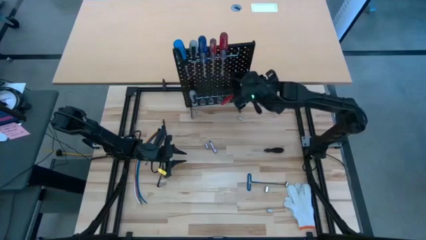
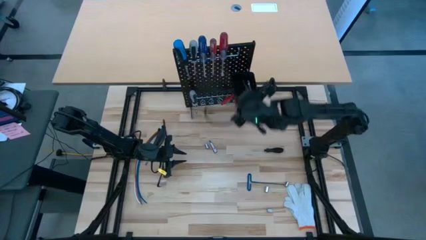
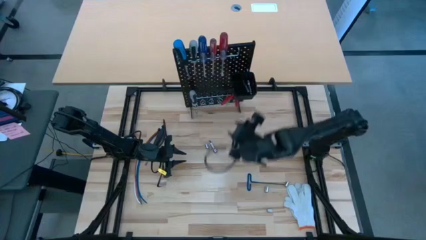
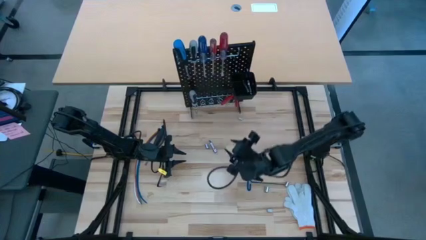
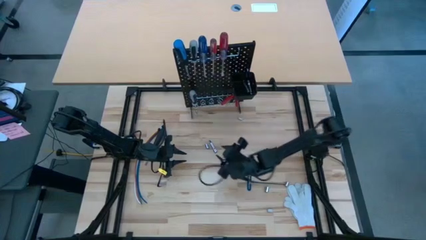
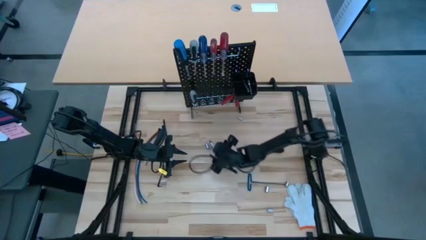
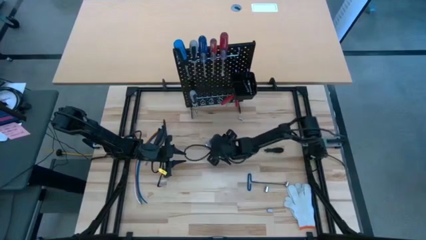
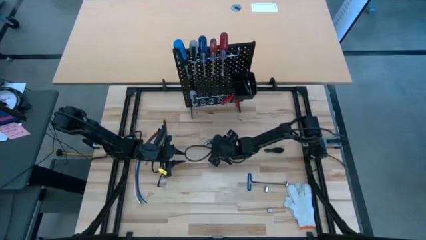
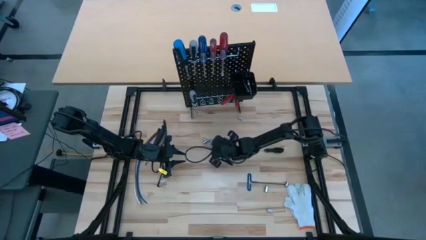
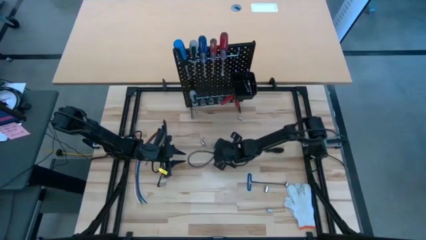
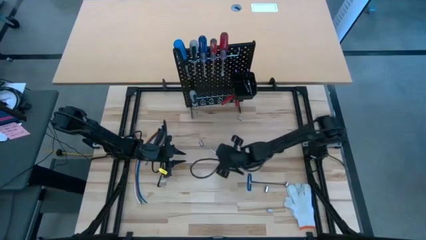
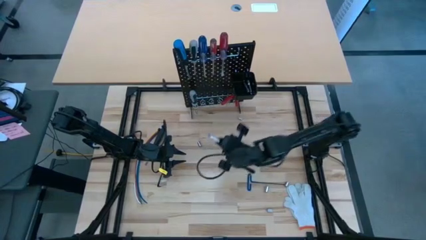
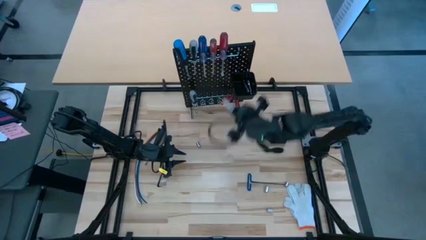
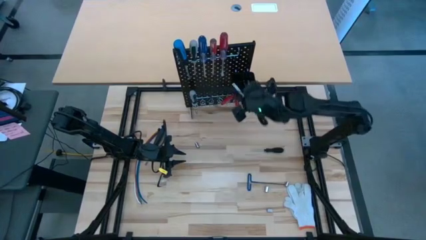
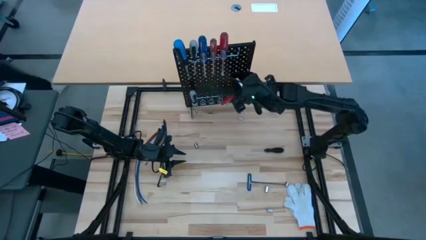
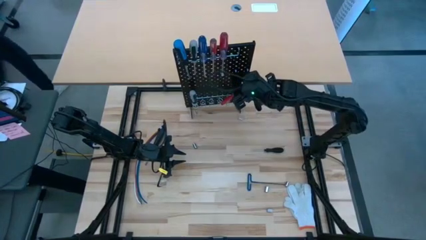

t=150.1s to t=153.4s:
Task: Hang tools onto peg board
Put the extension bar into the black bin on the pegboard

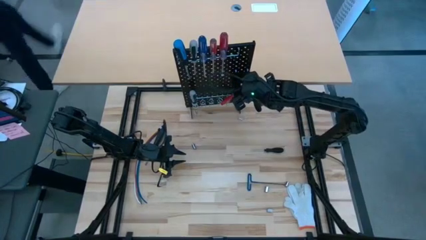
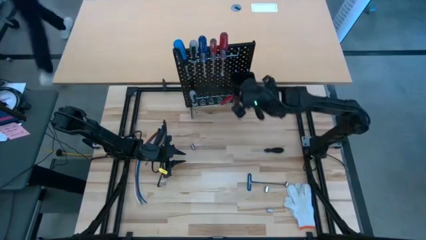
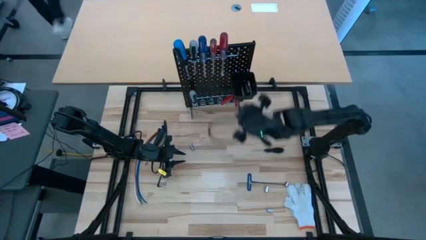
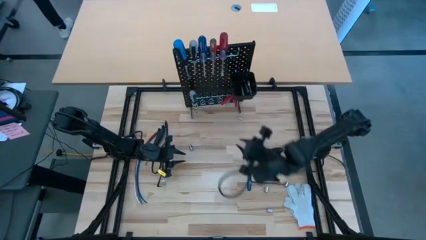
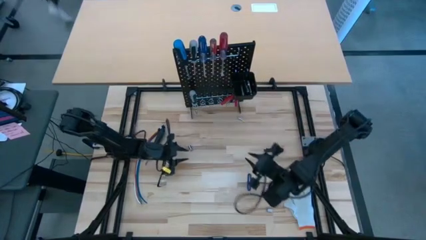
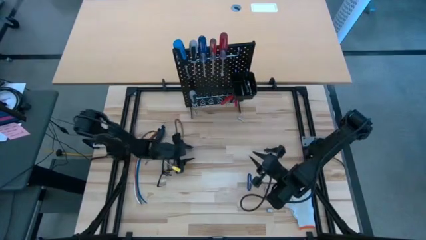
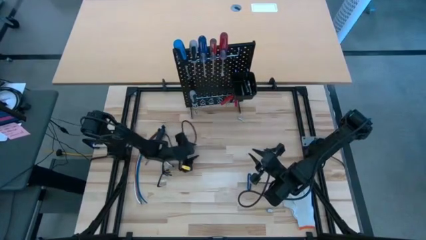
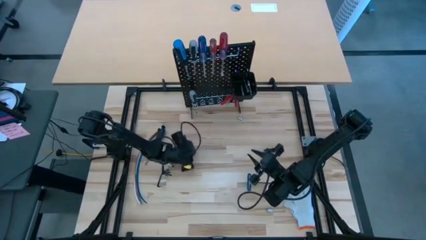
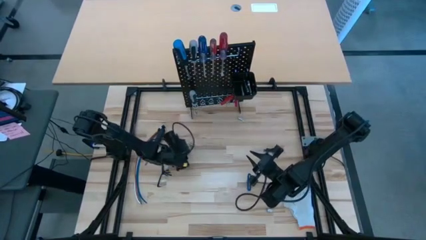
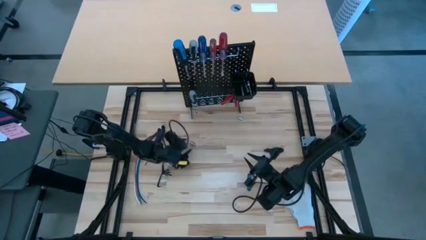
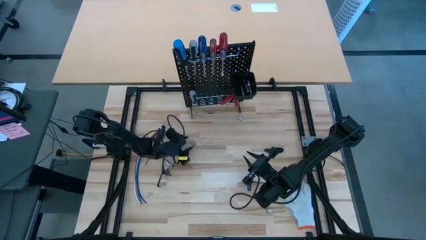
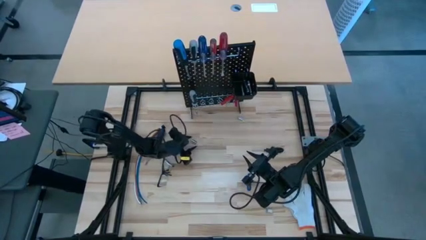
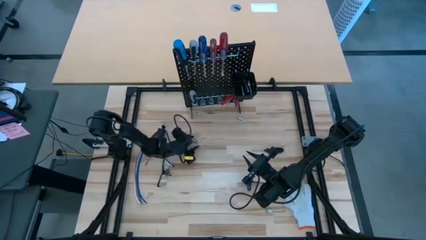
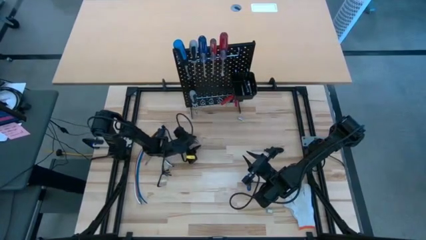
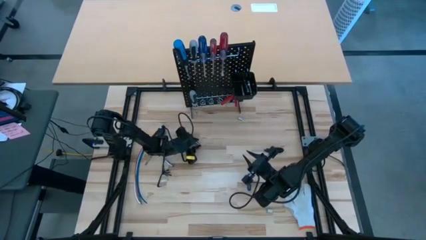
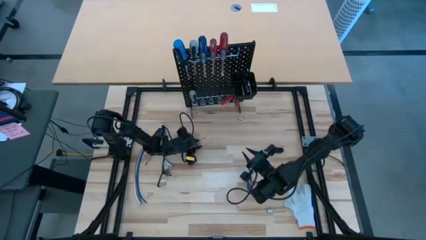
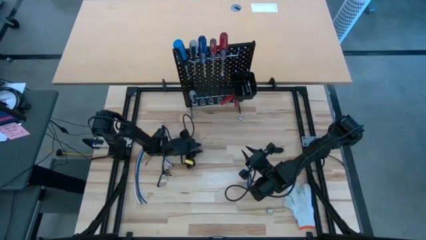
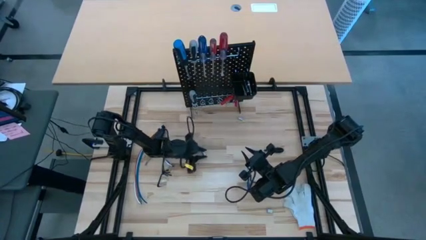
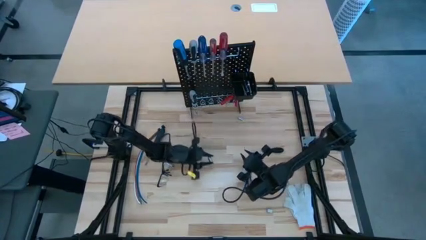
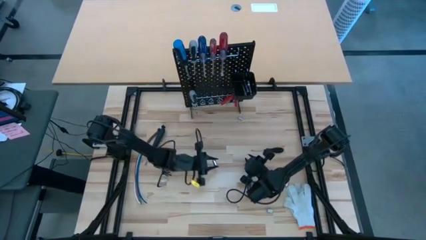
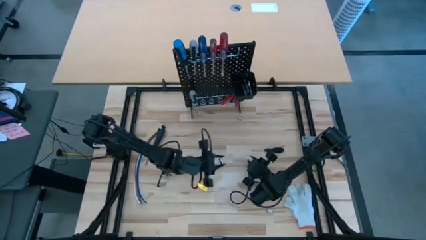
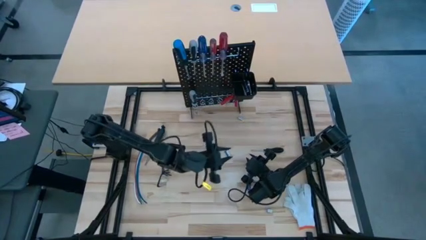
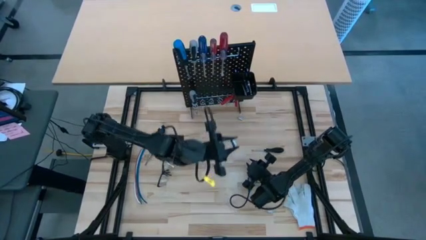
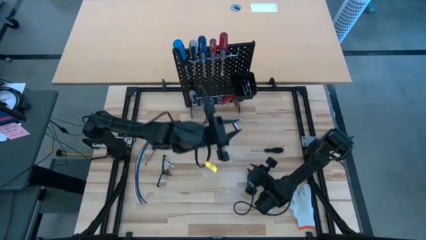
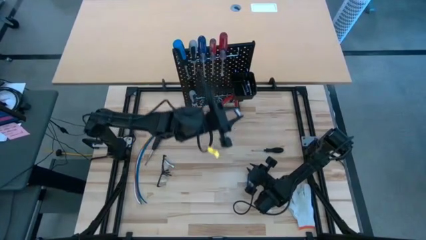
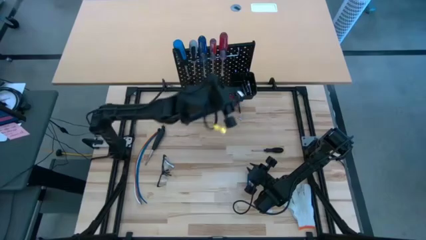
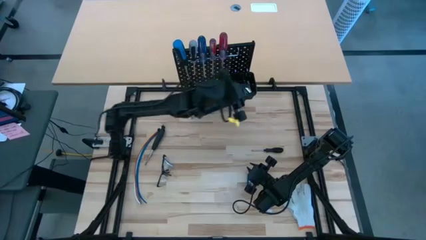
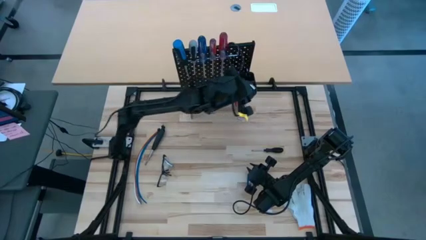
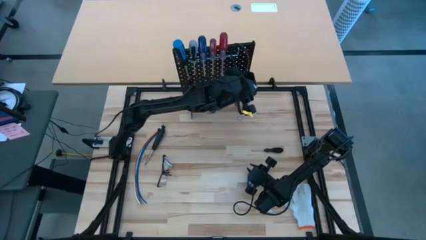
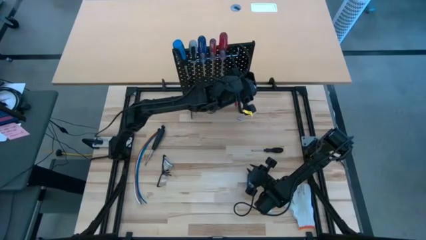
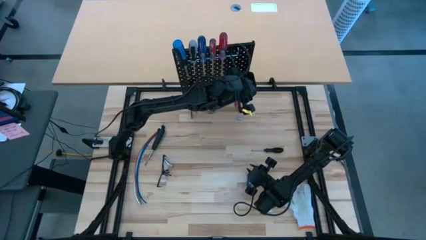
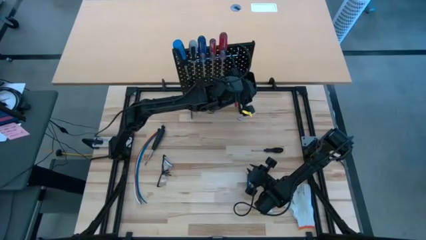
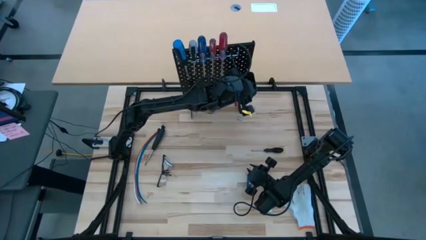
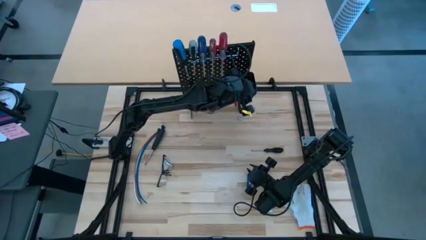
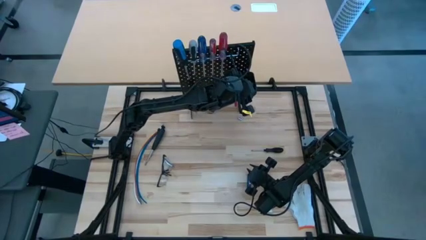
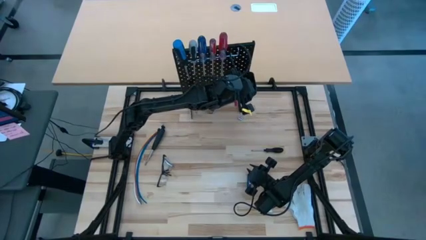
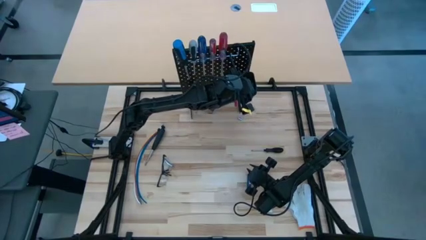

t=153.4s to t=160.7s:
Put the socket into the black bin on the pegboard

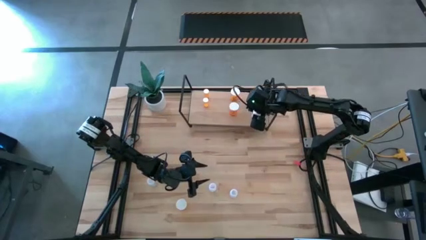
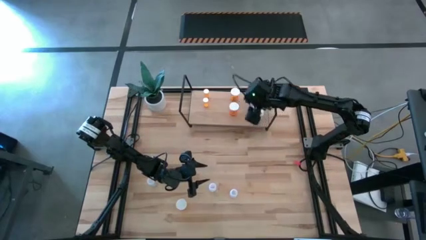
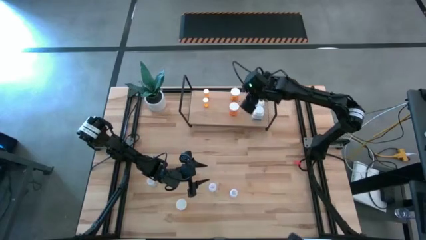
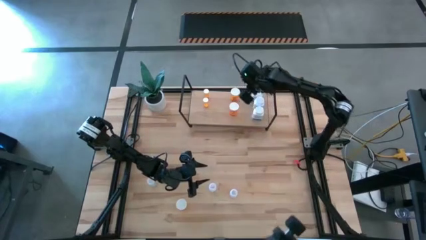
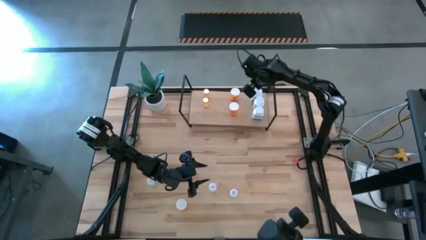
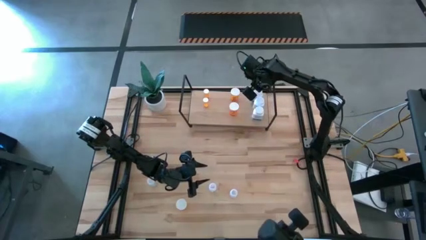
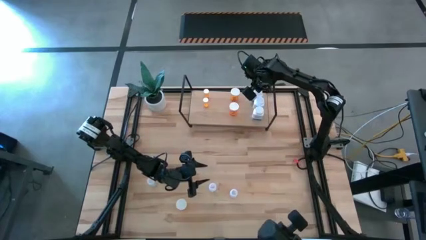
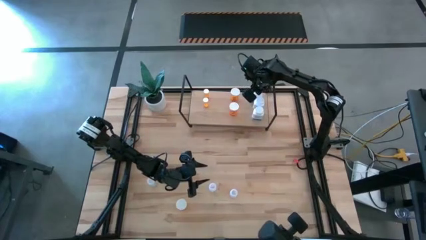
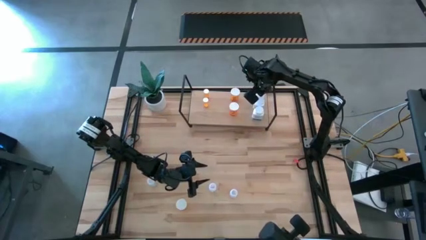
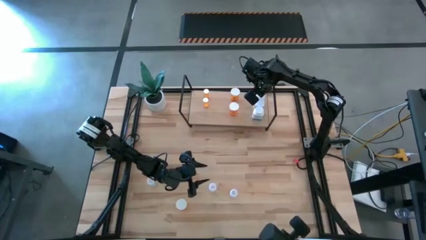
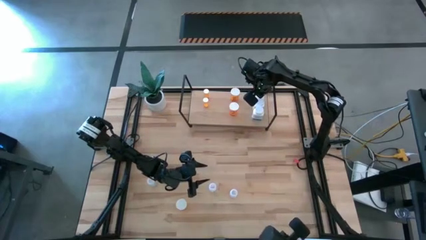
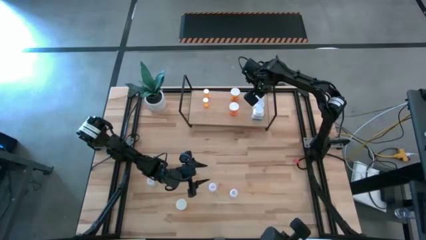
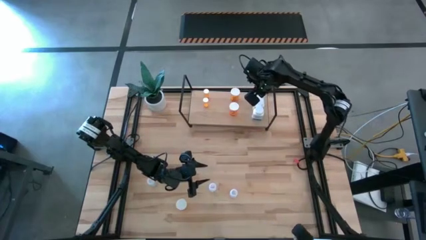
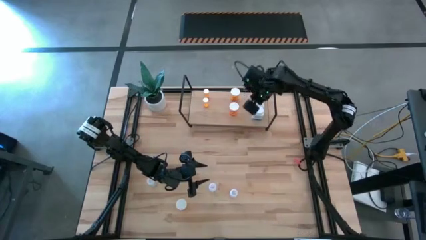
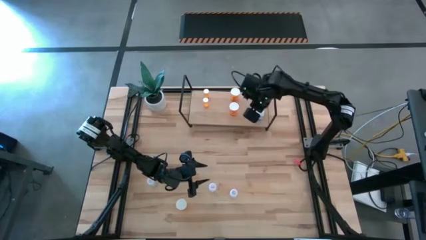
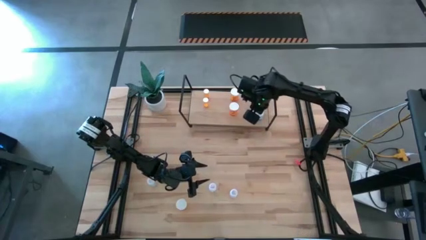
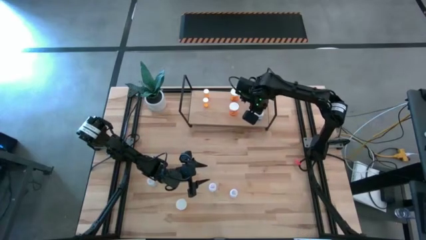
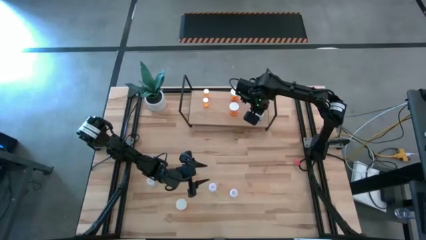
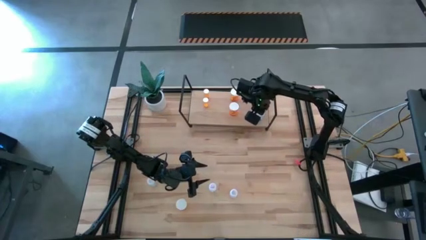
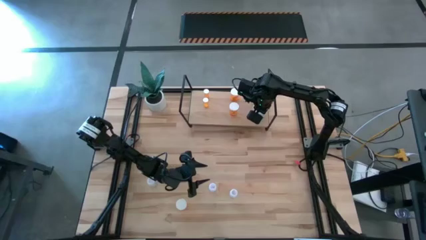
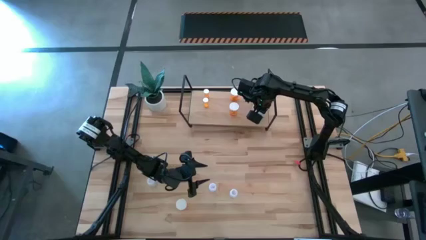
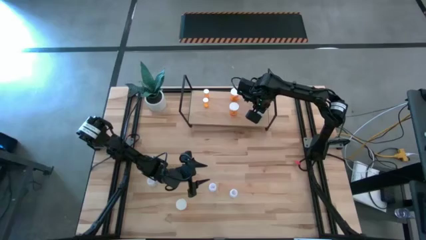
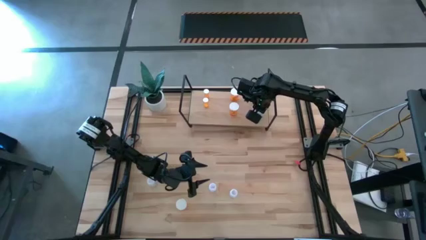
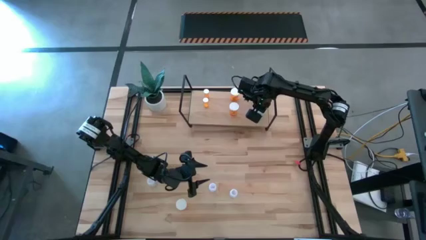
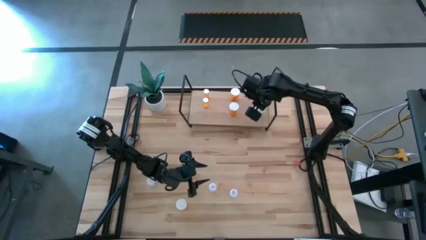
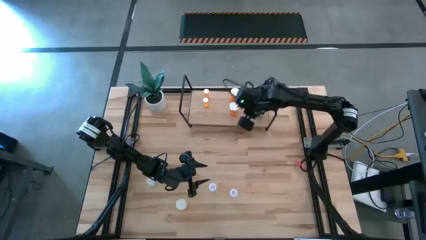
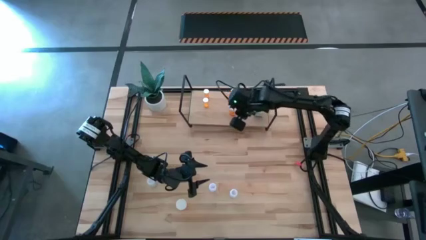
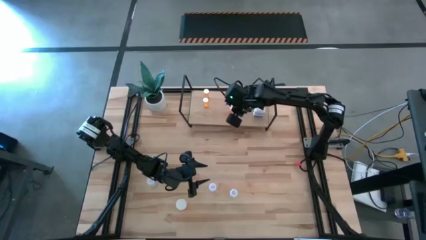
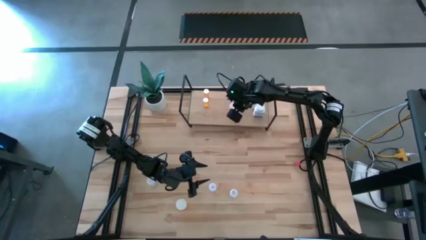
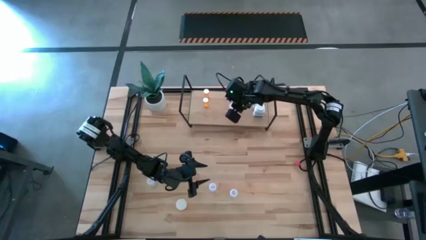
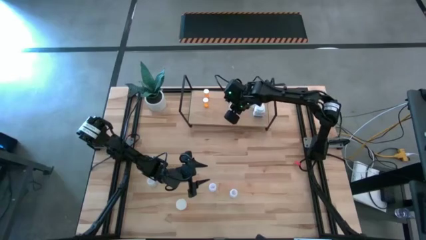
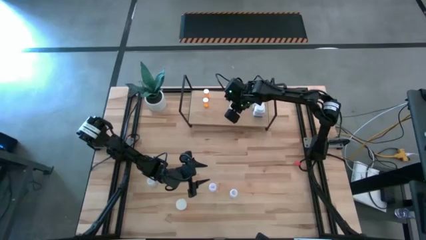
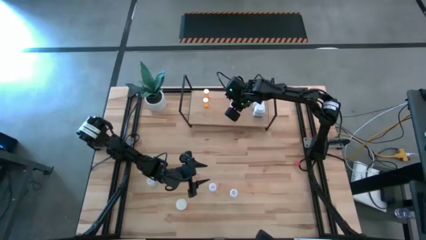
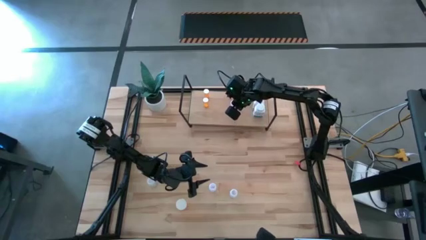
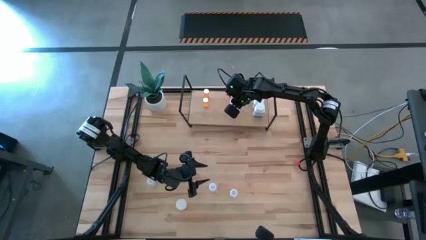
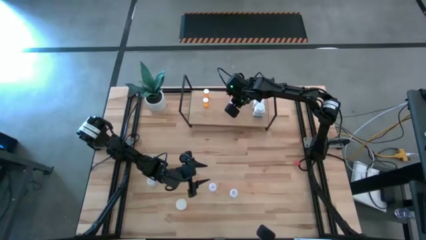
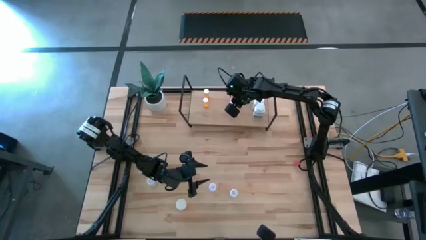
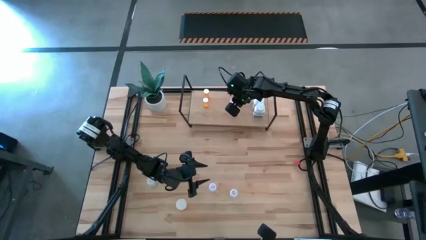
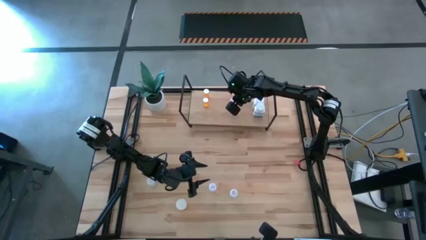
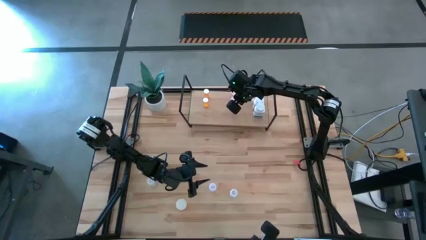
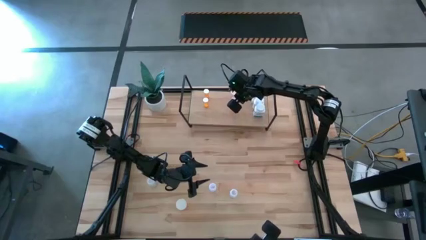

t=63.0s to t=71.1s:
Task: Pick and place medicine bottles onto shelf by color
Adjust the medicine bottles on the shelf
